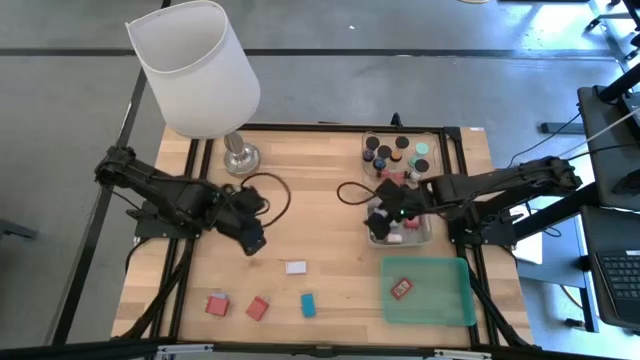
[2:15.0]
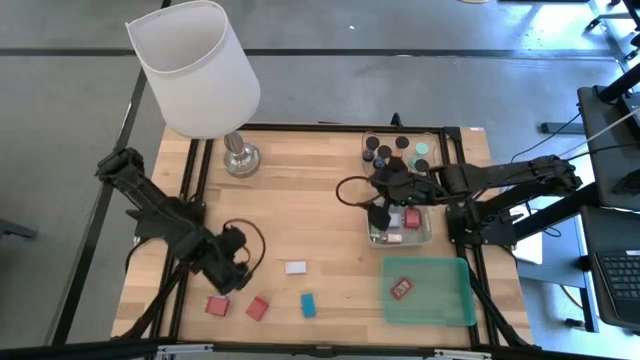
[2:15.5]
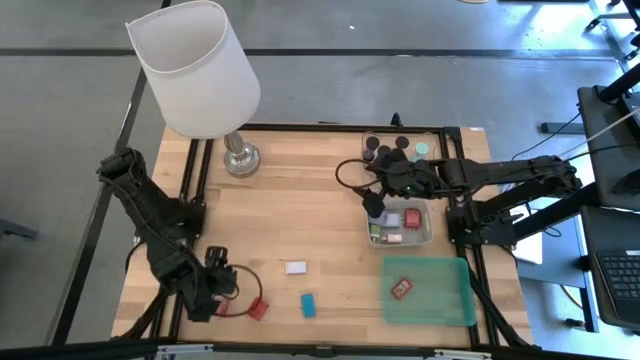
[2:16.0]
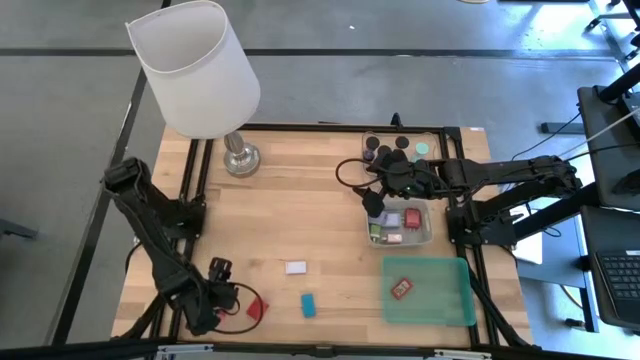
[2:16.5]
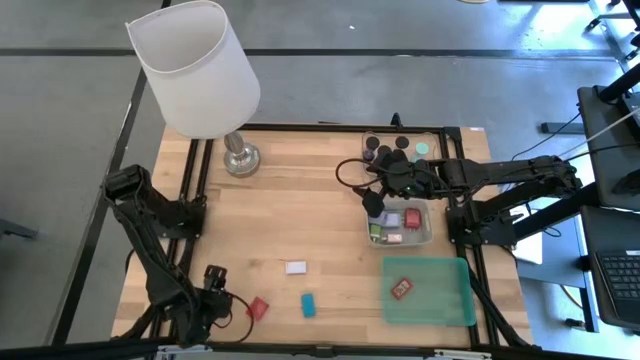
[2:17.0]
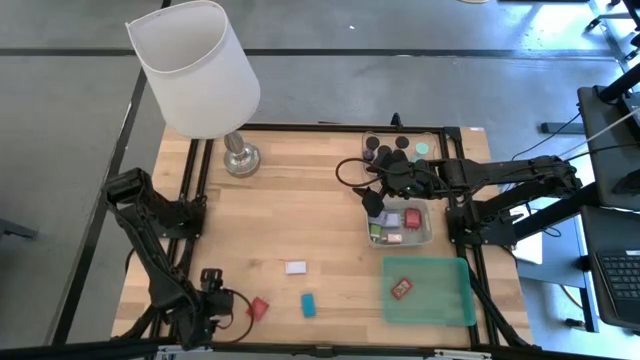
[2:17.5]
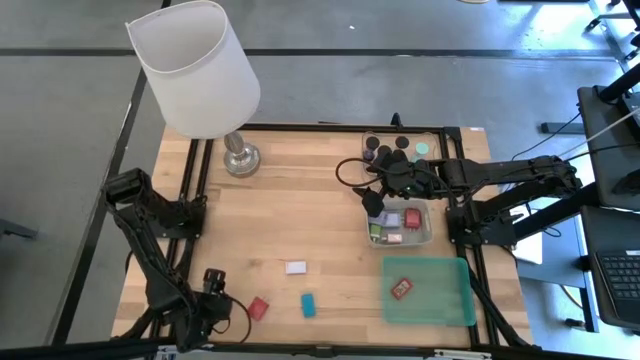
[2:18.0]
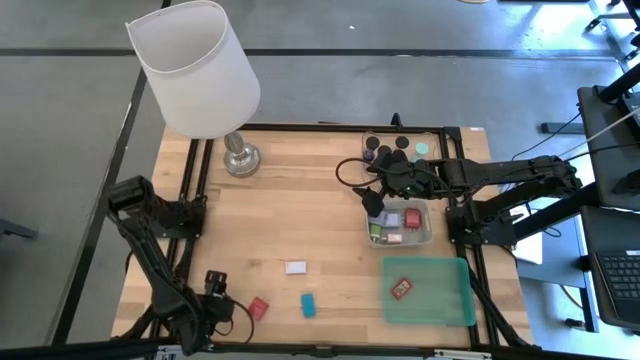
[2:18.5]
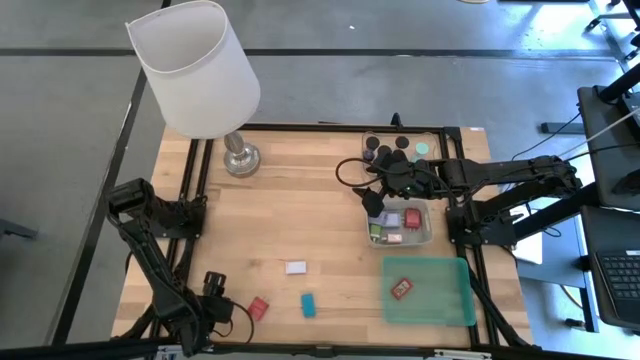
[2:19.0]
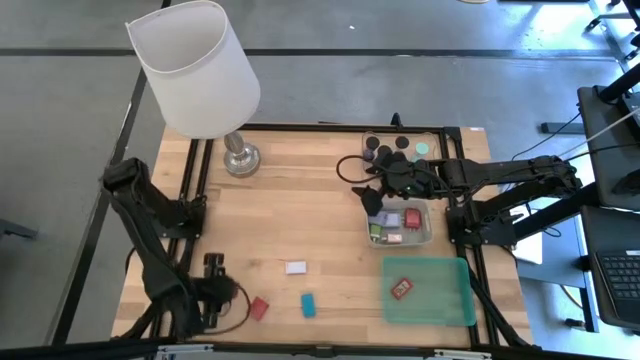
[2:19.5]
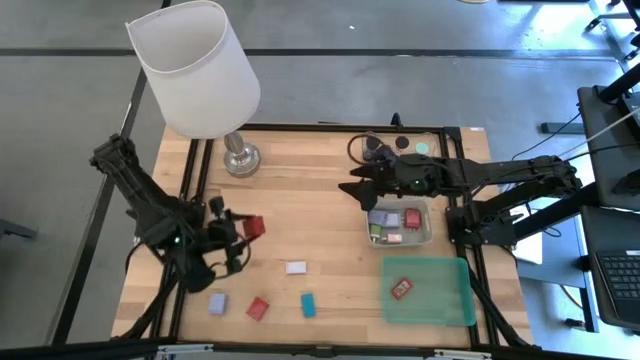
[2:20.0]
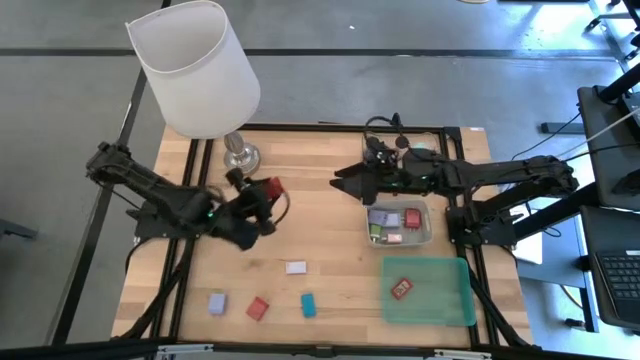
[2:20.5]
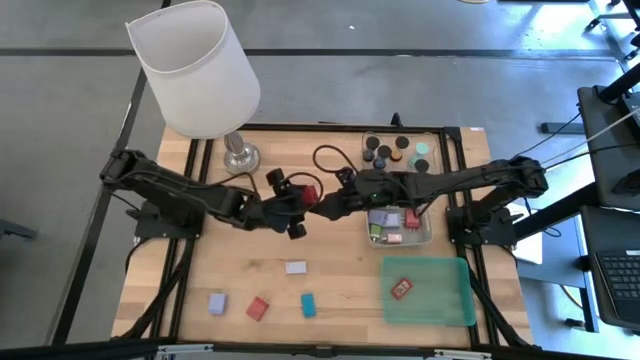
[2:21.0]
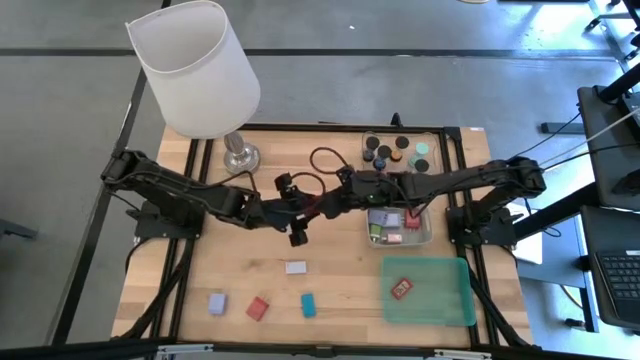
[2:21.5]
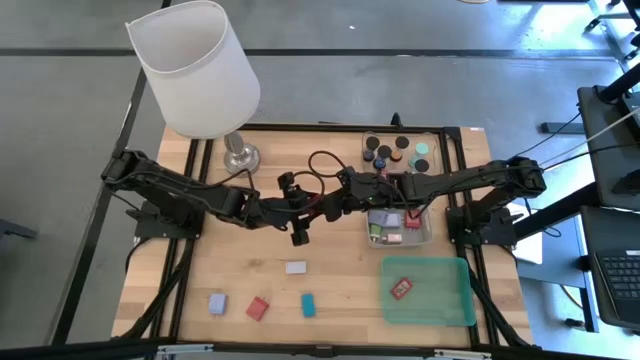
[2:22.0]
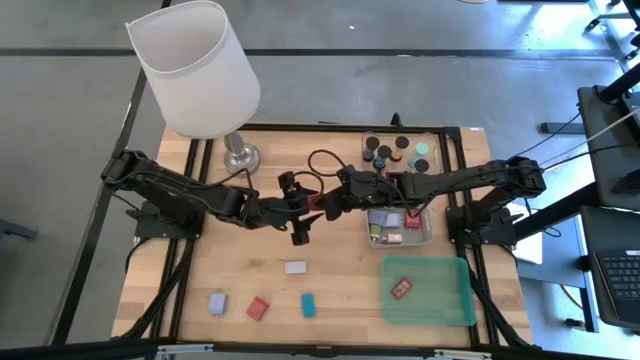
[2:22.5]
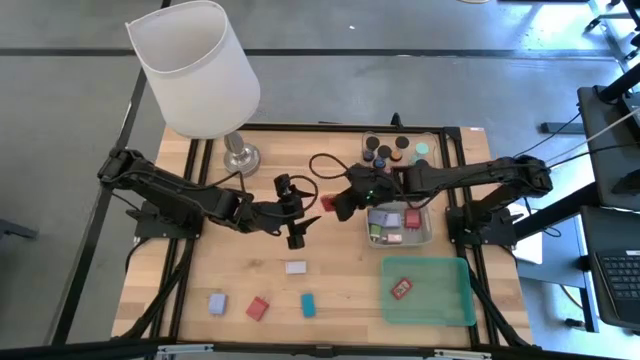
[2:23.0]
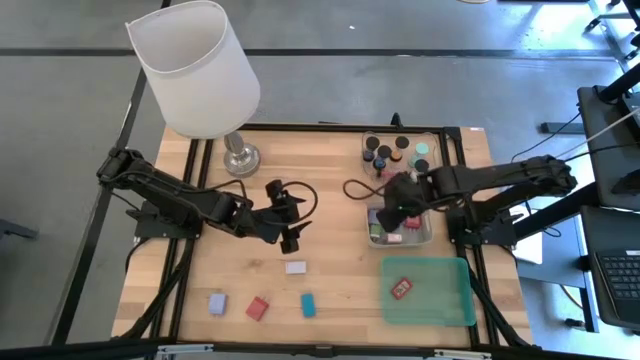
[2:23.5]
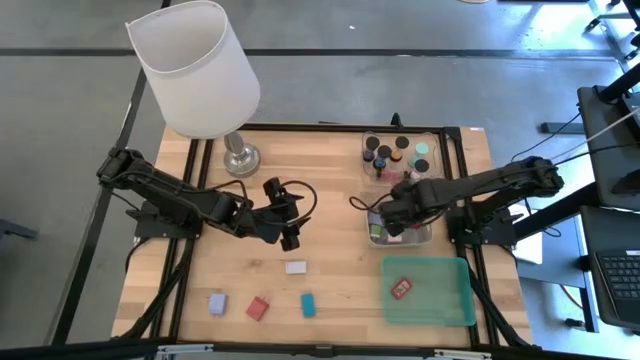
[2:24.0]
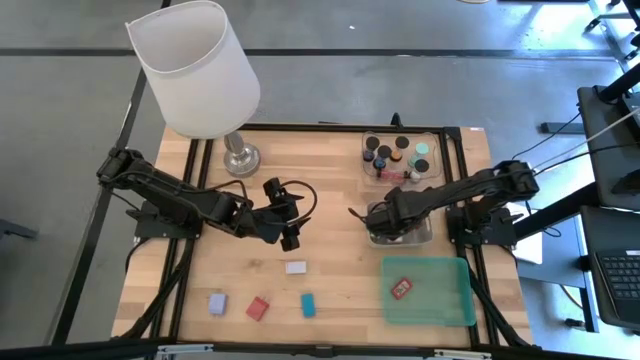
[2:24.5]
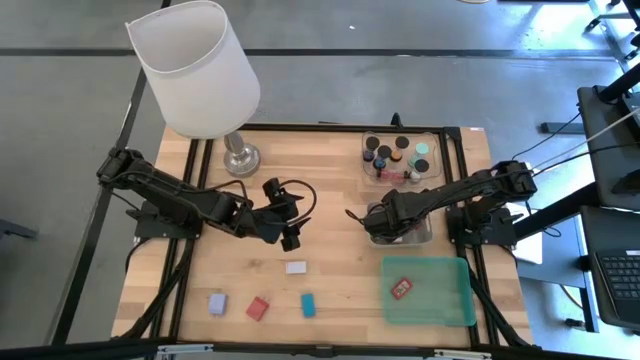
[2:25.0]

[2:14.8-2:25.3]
Task: Pick & Place Office items
Put the left red charger adapter into the white bin

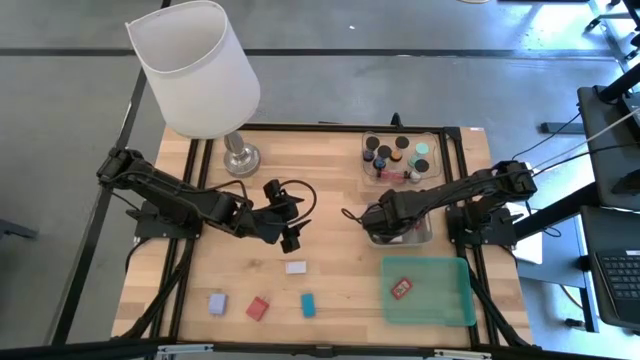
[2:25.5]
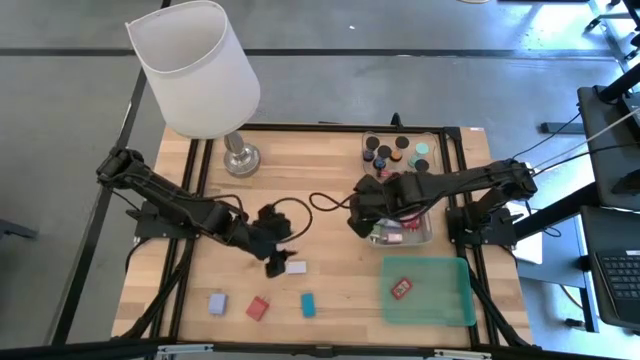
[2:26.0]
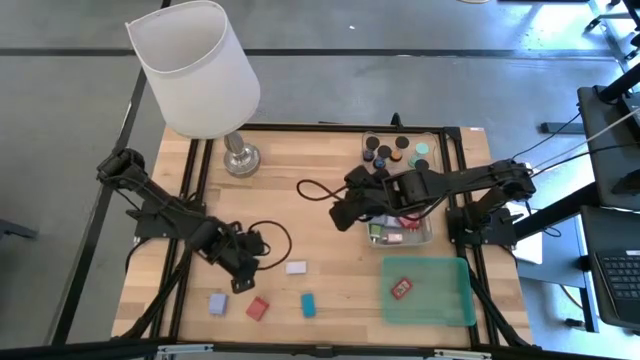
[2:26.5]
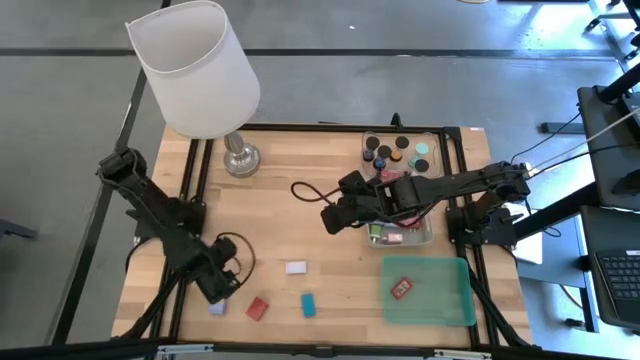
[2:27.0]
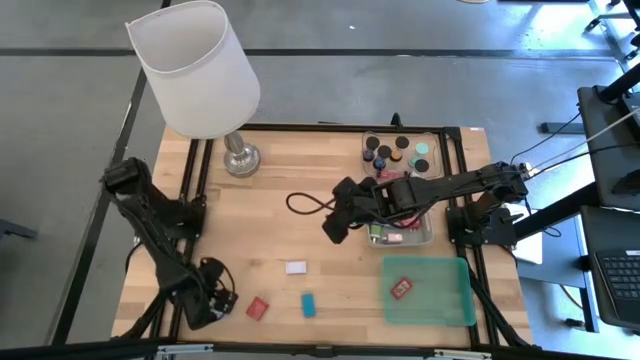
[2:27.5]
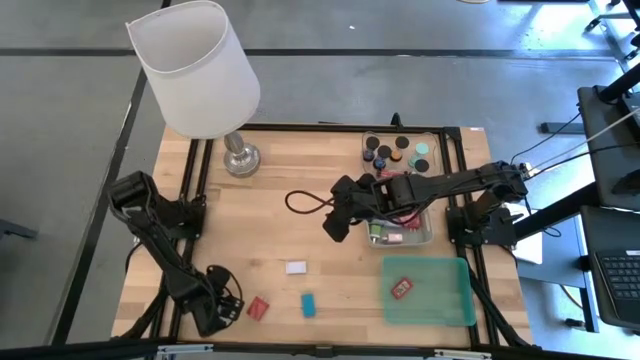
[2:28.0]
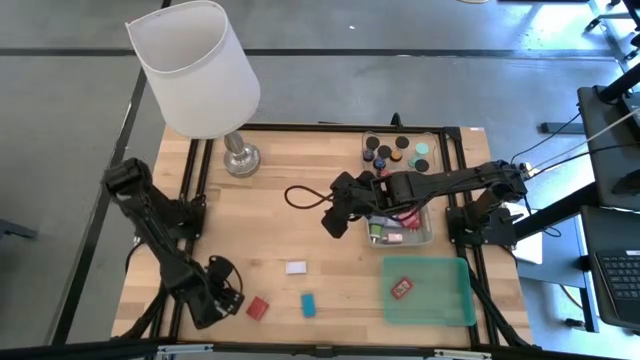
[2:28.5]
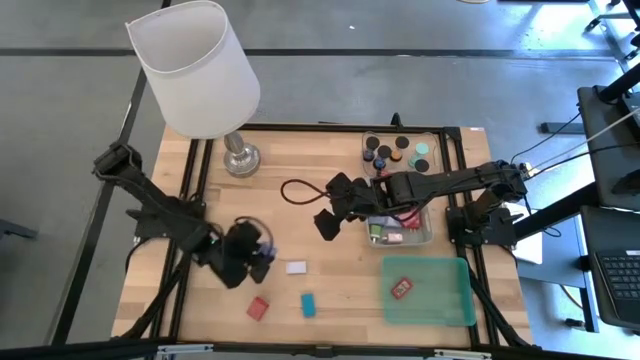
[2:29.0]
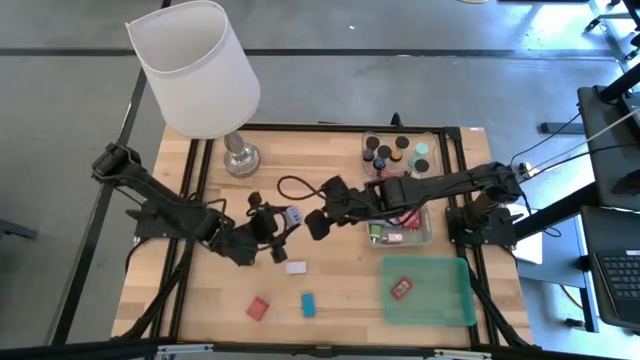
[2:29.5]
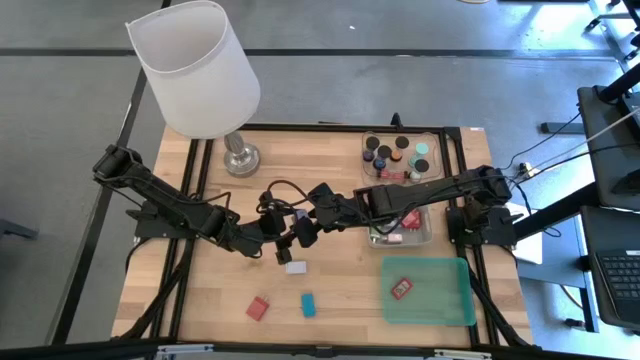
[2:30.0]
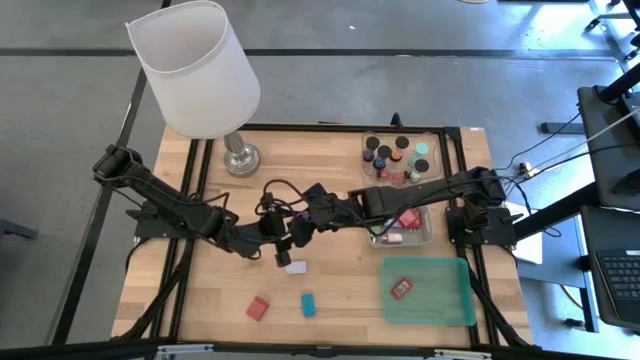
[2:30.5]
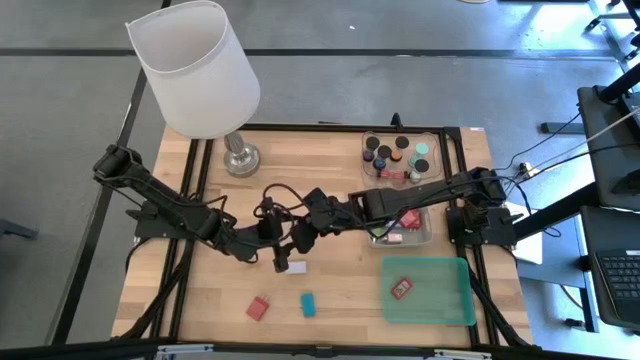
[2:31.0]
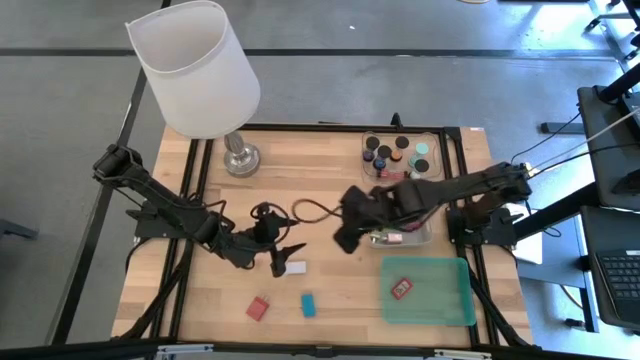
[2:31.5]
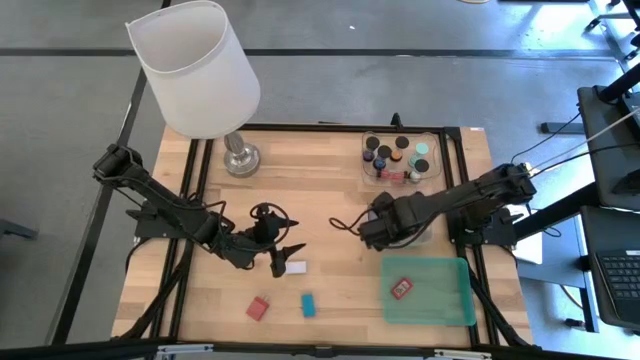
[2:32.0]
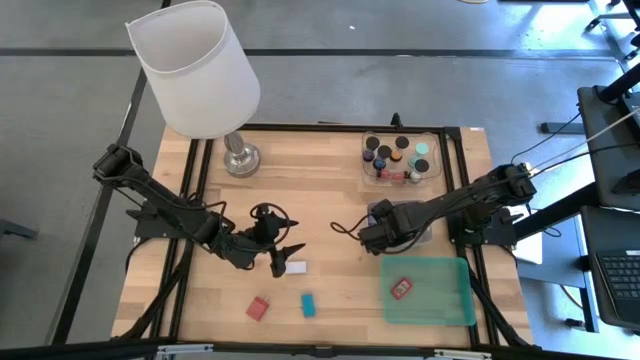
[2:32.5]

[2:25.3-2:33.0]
Put the purple charger adapter into the white bin

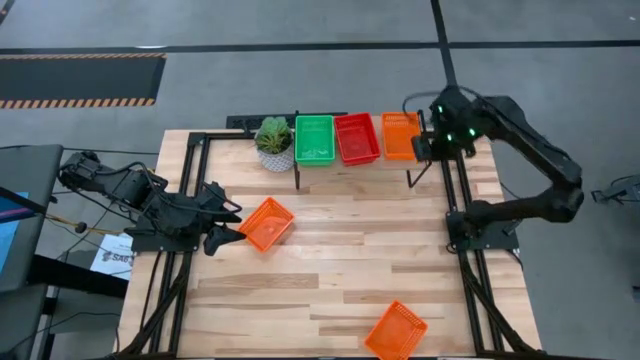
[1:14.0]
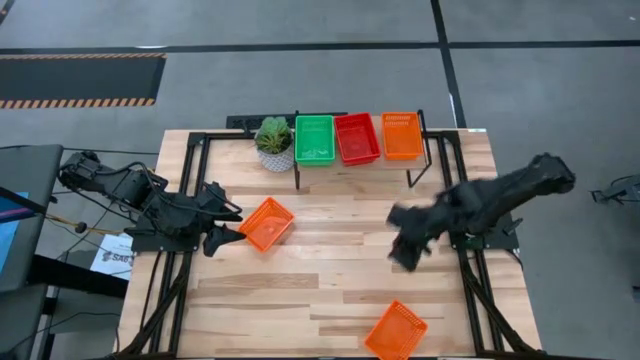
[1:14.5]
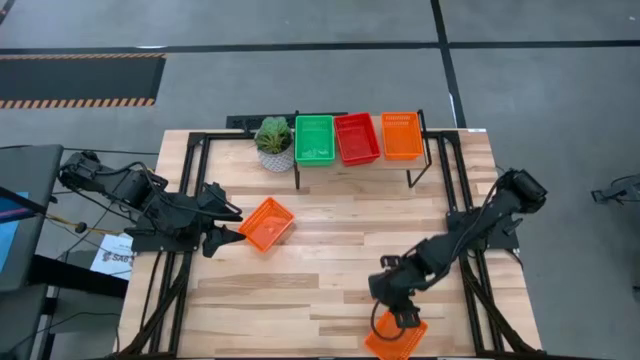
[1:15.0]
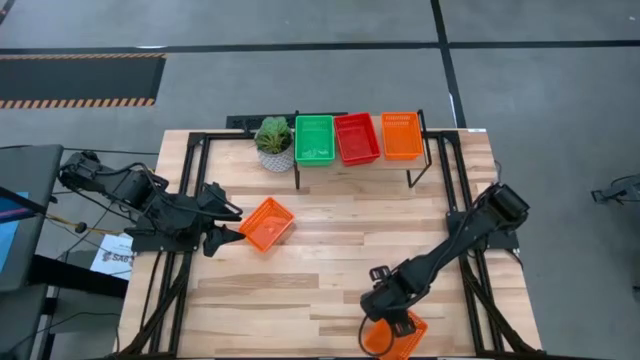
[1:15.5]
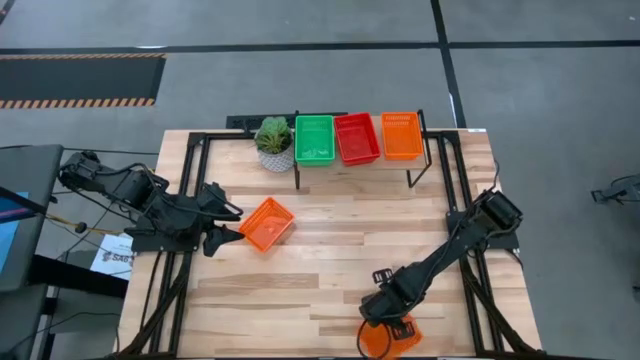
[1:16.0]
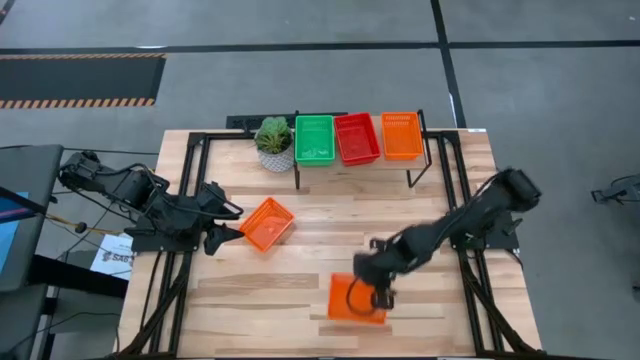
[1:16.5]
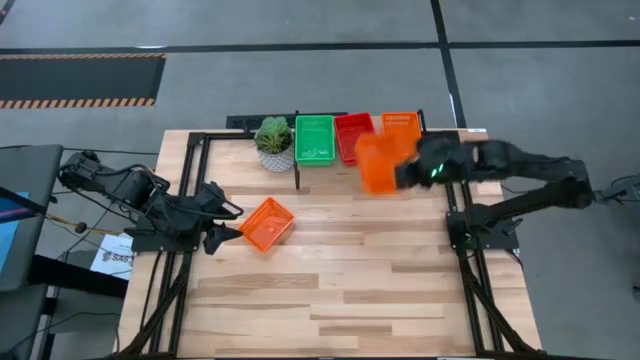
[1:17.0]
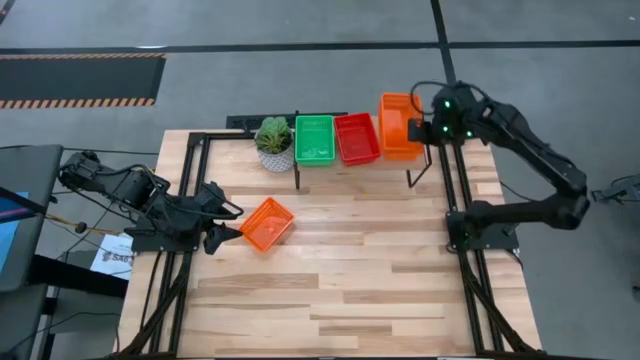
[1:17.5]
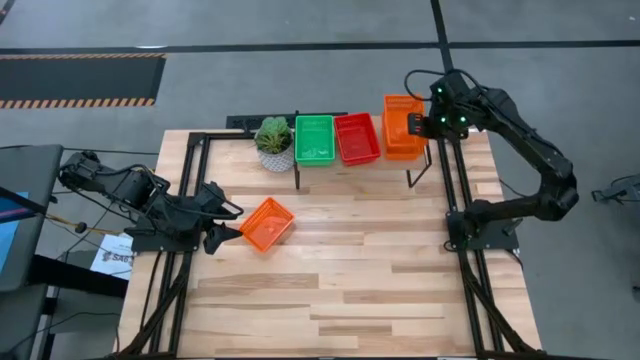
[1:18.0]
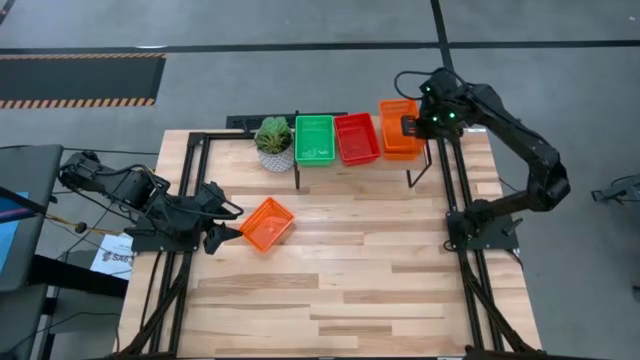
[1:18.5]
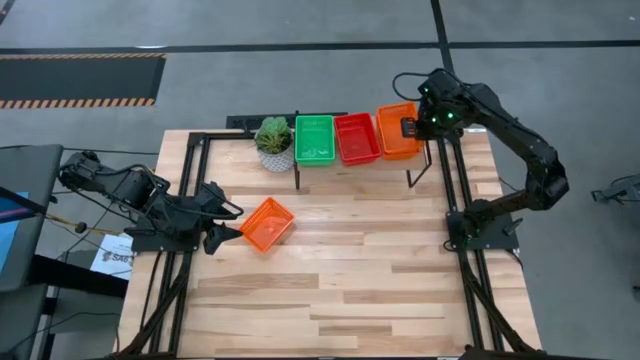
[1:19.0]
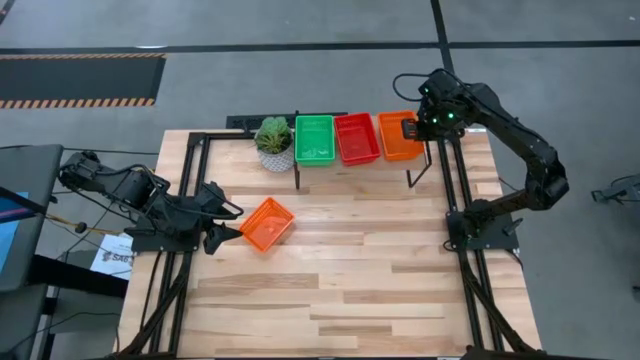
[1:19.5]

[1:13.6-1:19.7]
Task: Stack baskets on shelf by color
Stack the bottom orange bin on top of the orange bin on the shelf
